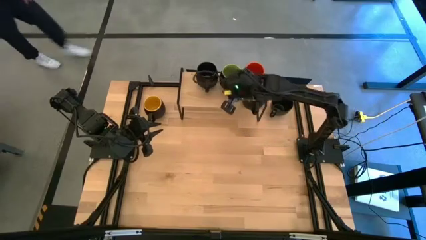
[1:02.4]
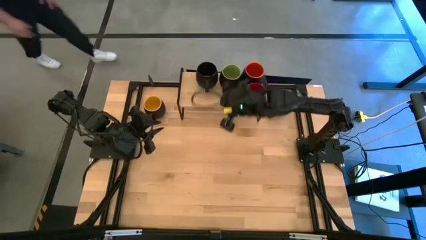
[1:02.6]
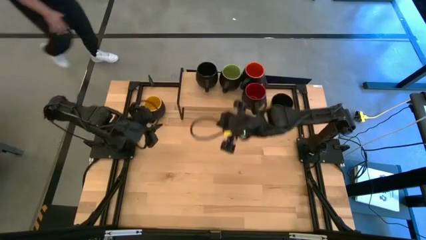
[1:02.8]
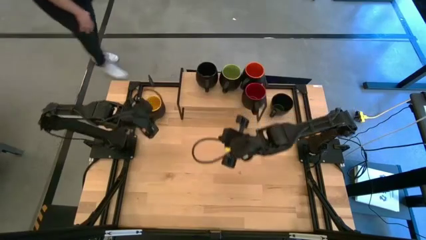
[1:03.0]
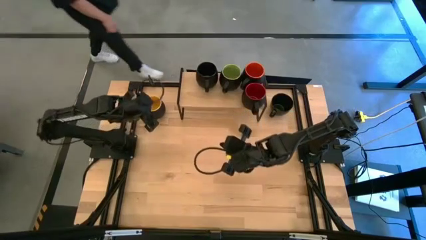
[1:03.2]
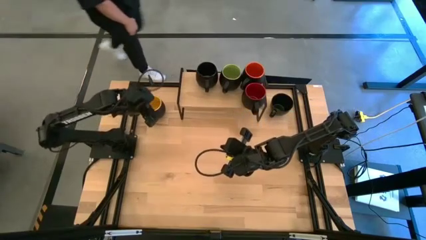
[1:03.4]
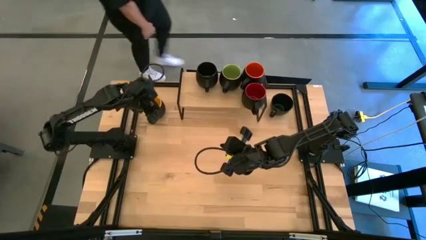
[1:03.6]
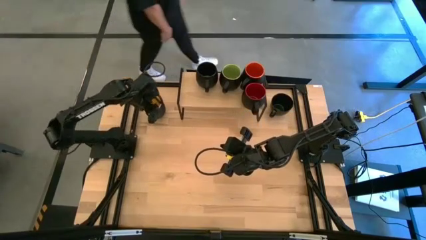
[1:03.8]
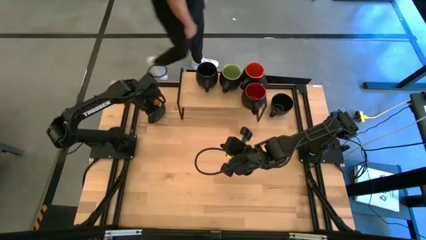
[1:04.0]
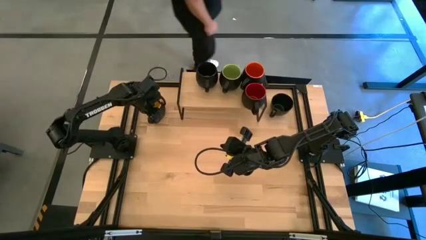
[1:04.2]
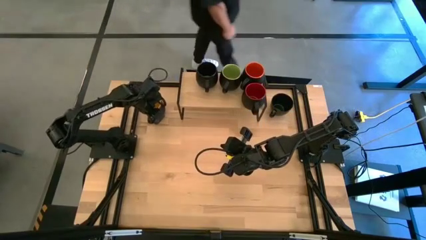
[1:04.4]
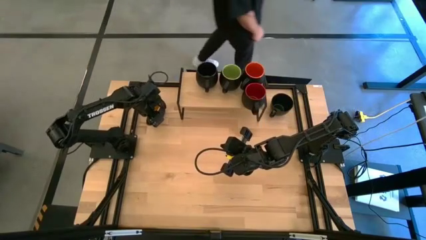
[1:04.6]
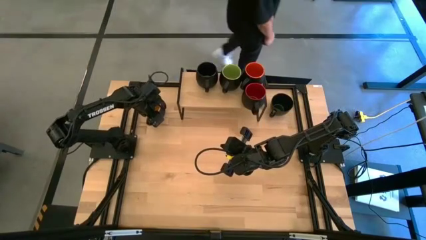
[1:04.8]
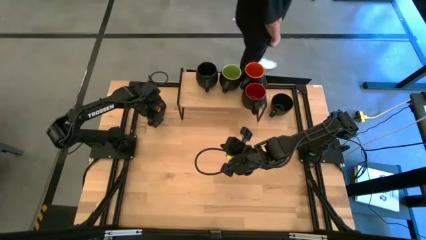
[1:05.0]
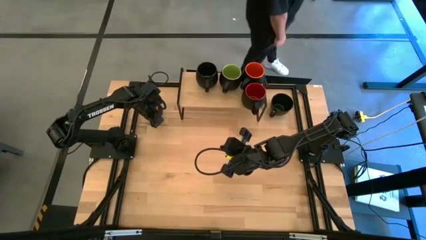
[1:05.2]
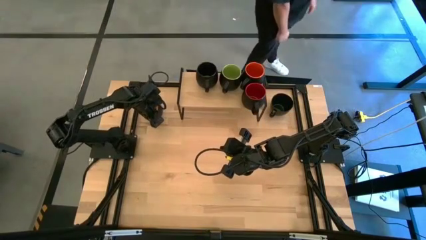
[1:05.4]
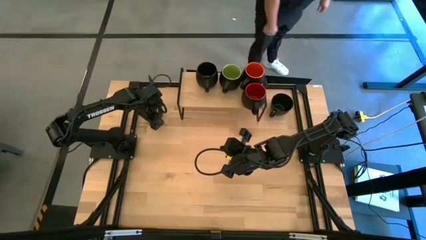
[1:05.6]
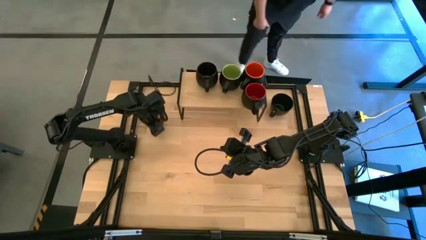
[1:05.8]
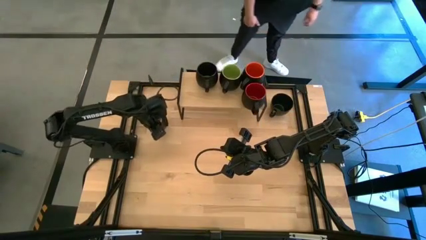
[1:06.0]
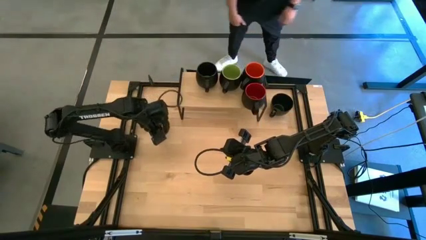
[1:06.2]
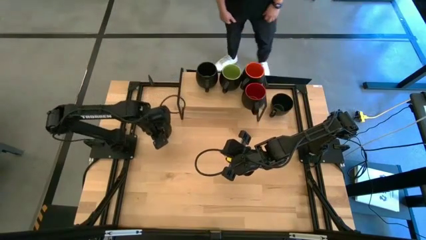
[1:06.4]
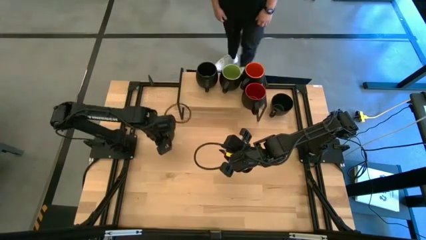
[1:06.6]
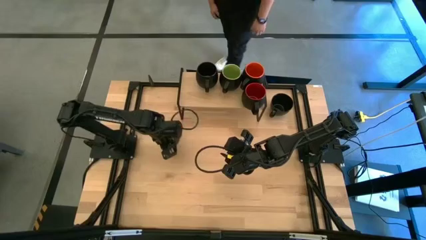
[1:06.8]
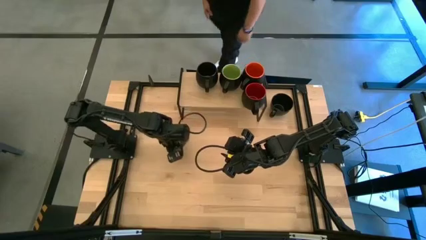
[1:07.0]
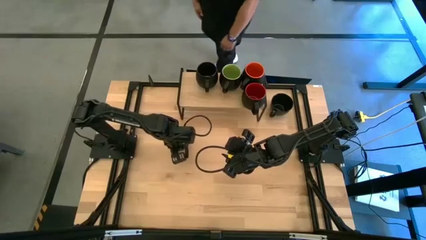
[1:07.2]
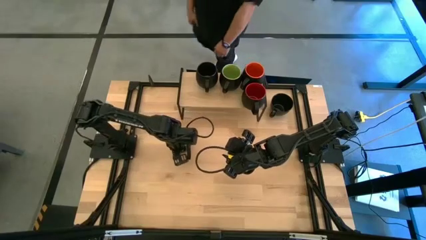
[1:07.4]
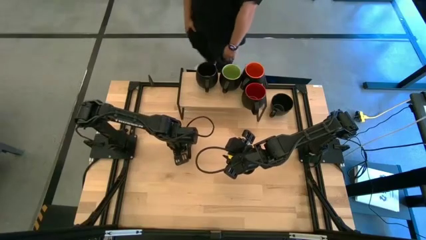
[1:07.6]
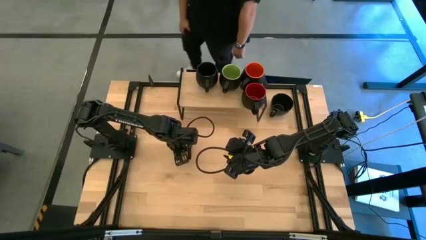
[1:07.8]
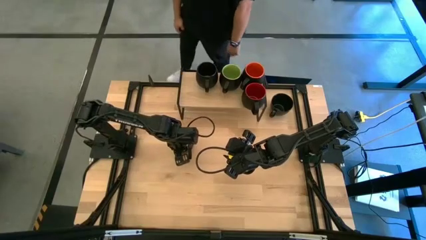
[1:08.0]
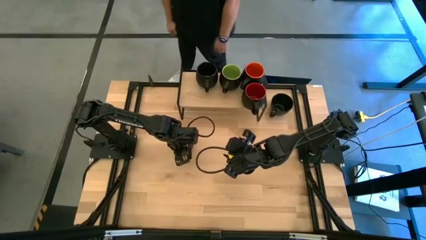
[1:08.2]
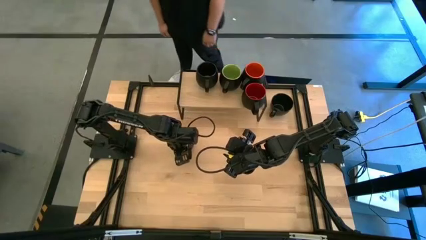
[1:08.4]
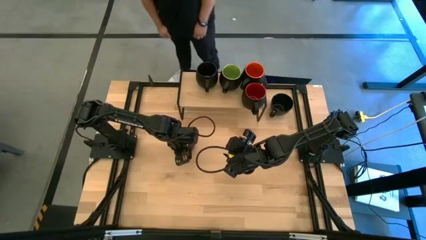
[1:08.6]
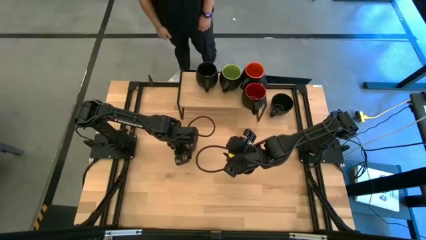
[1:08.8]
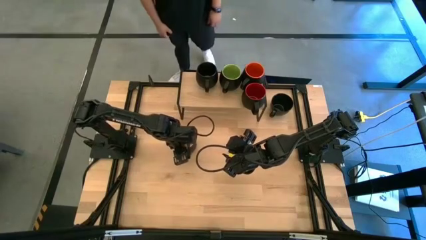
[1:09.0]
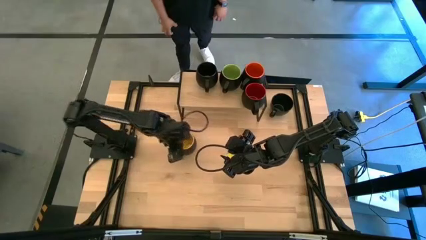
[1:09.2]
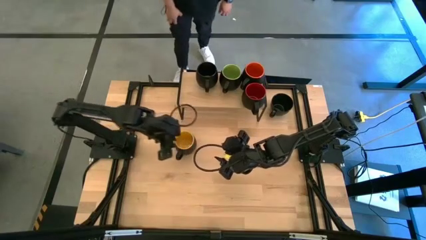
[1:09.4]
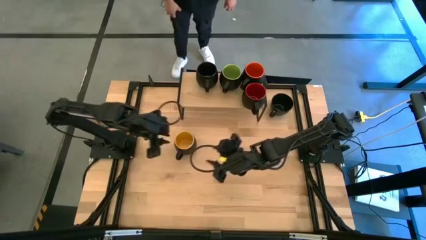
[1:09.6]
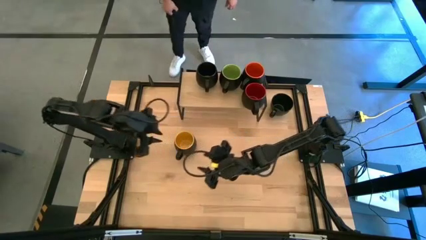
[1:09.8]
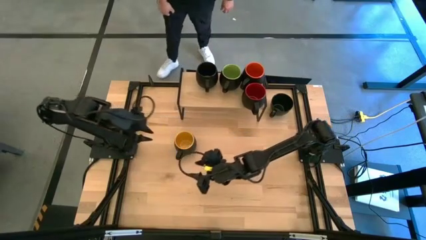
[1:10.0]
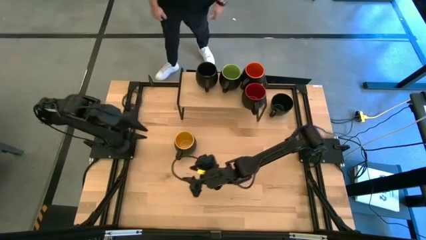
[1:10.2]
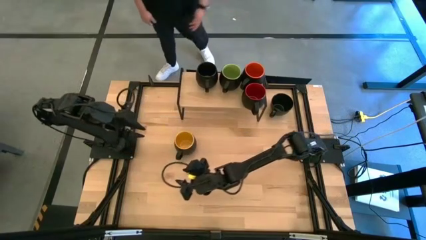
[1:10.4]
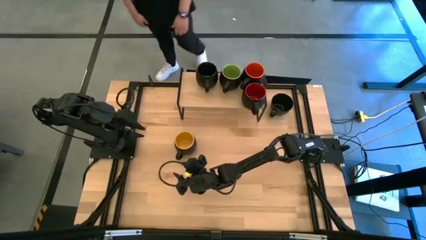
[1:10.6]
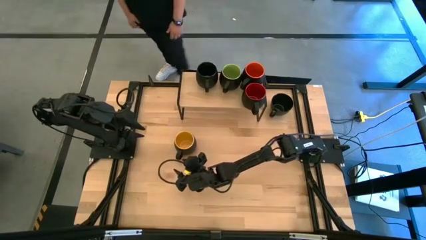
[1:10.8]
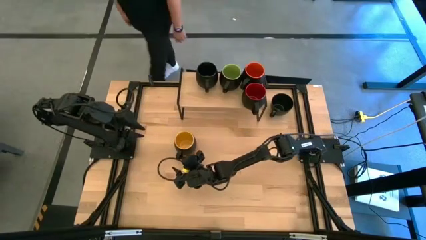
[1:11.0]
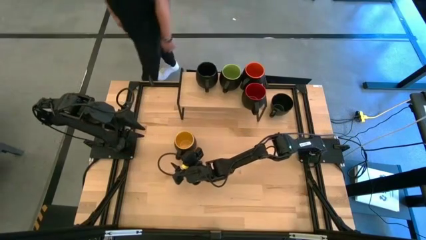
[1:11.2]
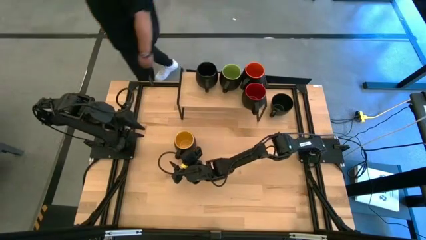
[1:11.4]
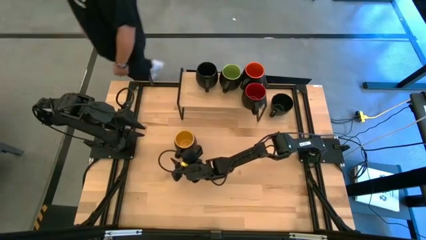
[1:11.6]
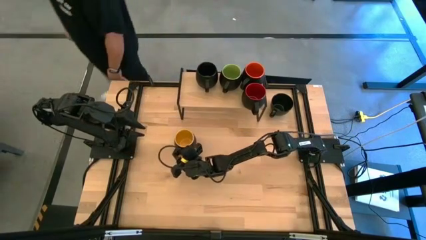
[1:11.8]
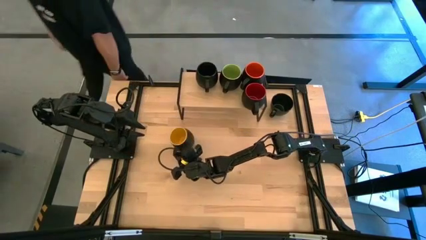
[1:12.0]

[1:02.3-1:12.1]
Task: Place coffee mugs
Put the yellow mug on the shelf

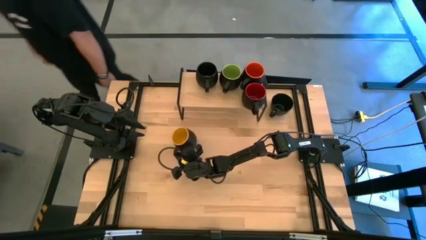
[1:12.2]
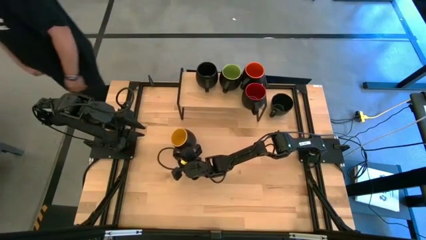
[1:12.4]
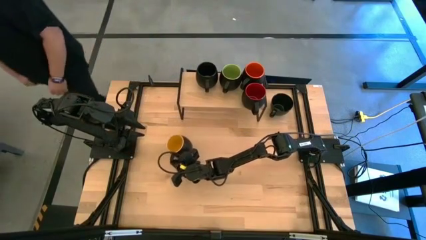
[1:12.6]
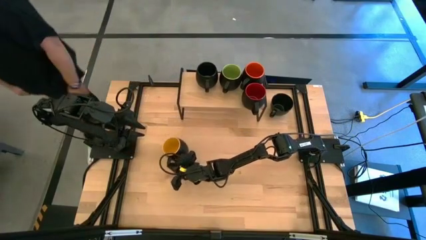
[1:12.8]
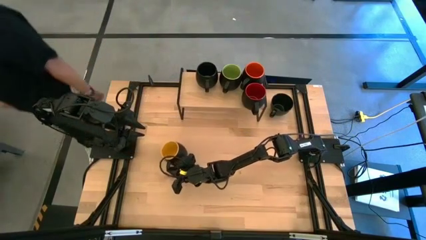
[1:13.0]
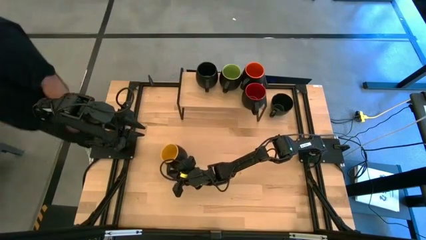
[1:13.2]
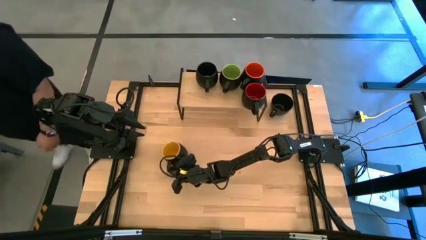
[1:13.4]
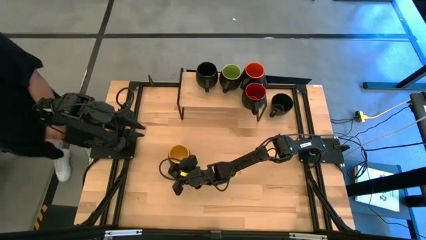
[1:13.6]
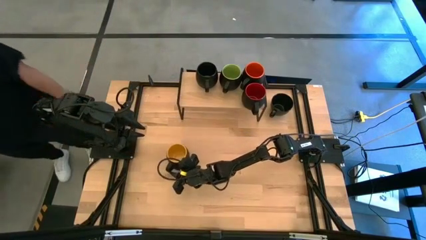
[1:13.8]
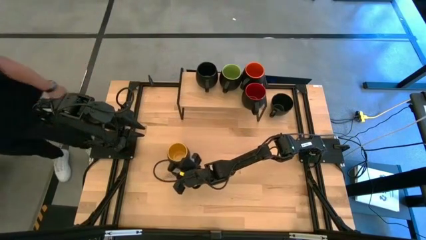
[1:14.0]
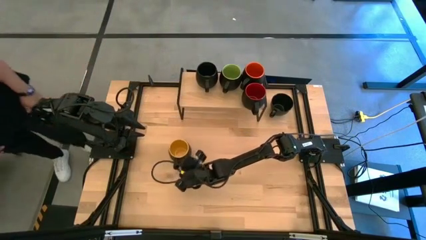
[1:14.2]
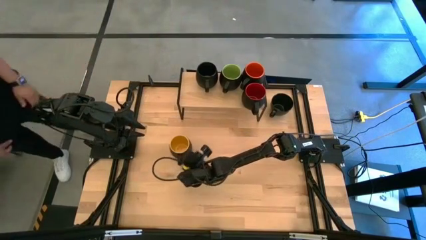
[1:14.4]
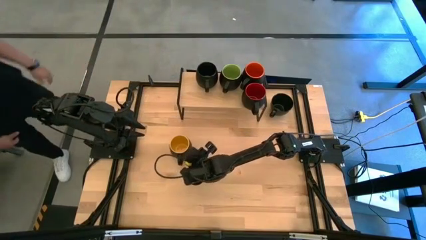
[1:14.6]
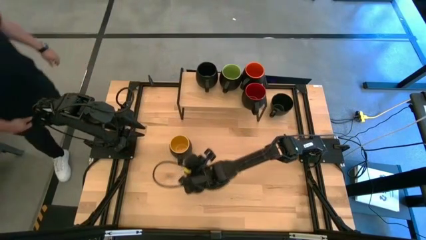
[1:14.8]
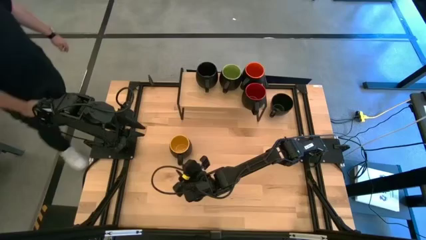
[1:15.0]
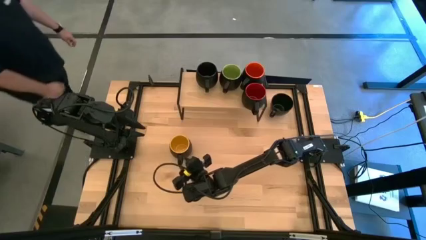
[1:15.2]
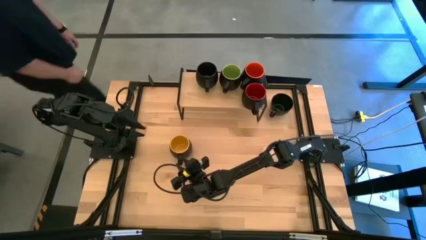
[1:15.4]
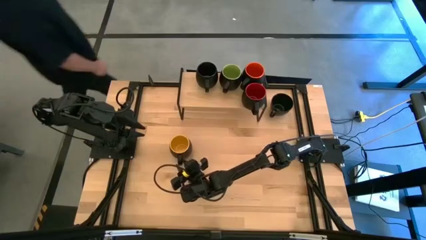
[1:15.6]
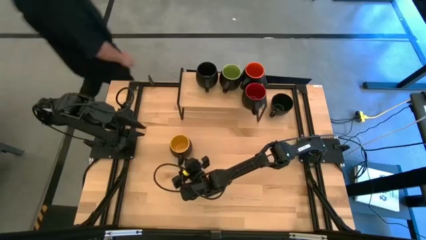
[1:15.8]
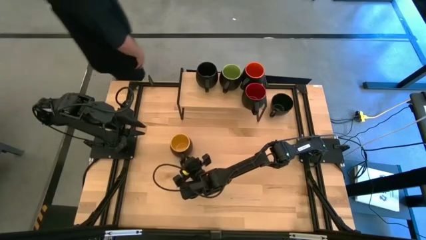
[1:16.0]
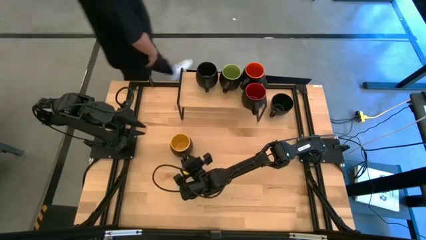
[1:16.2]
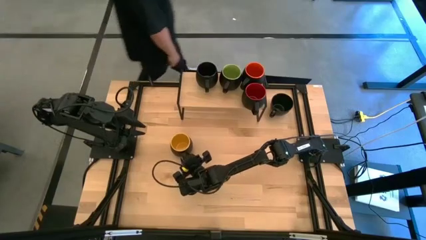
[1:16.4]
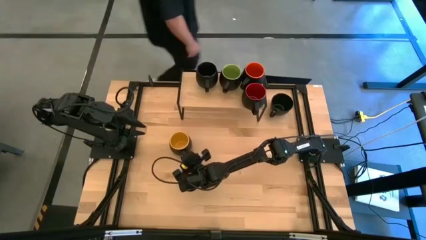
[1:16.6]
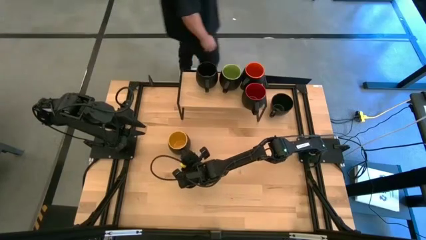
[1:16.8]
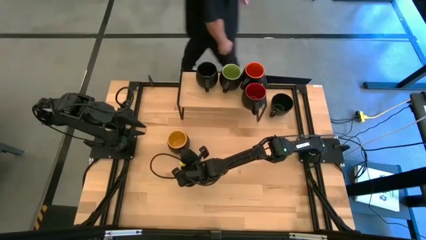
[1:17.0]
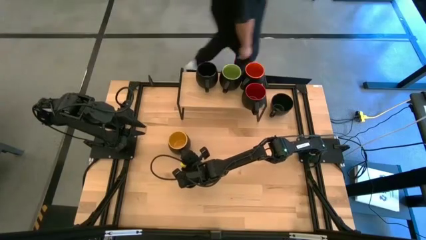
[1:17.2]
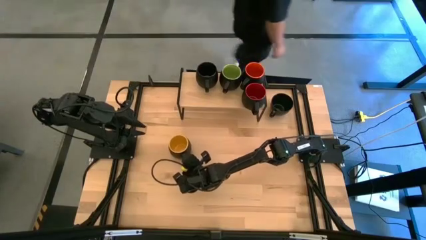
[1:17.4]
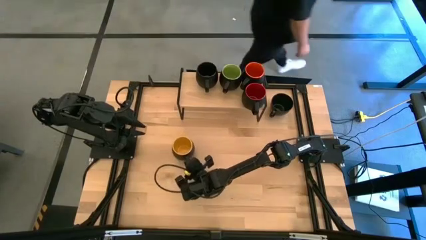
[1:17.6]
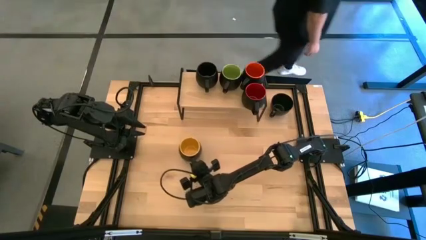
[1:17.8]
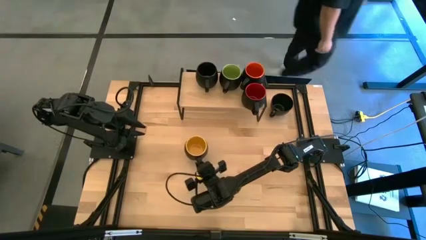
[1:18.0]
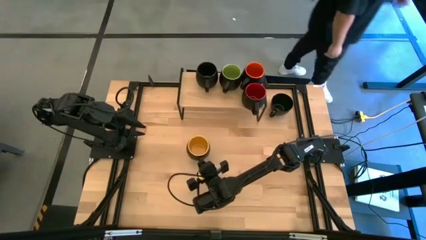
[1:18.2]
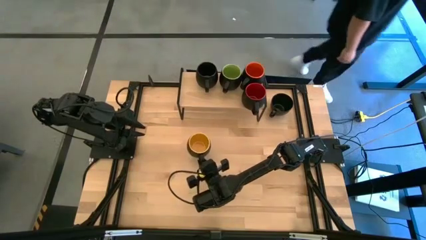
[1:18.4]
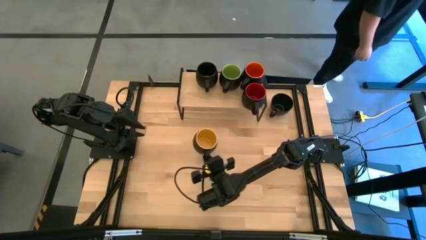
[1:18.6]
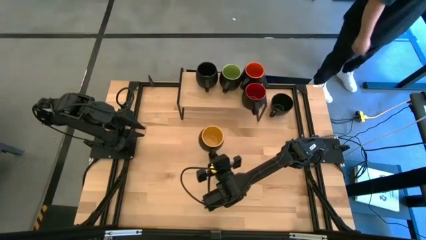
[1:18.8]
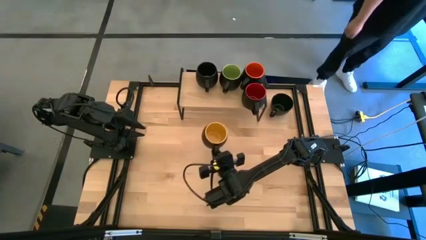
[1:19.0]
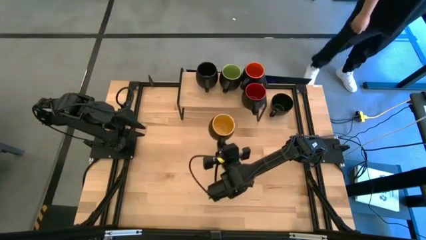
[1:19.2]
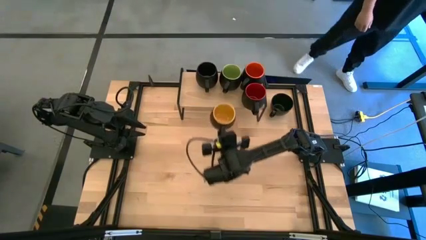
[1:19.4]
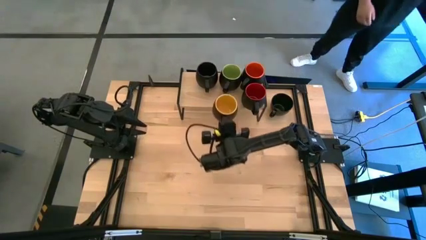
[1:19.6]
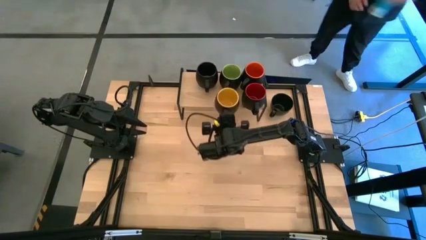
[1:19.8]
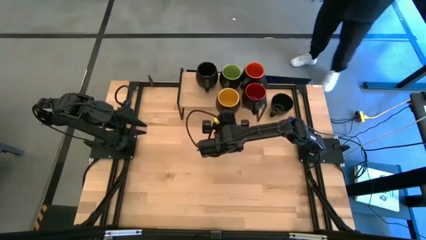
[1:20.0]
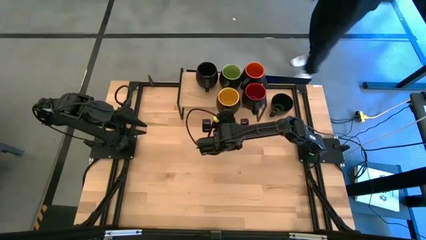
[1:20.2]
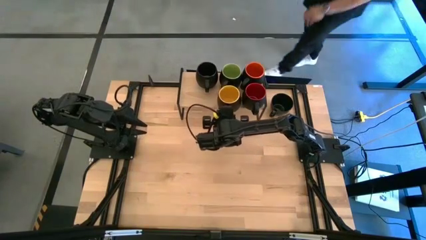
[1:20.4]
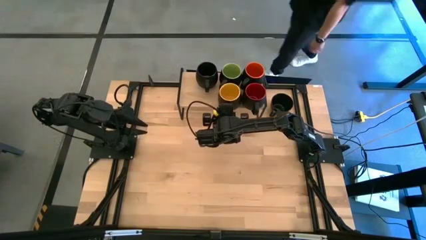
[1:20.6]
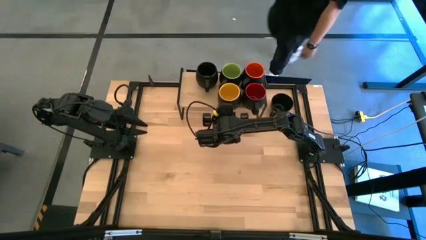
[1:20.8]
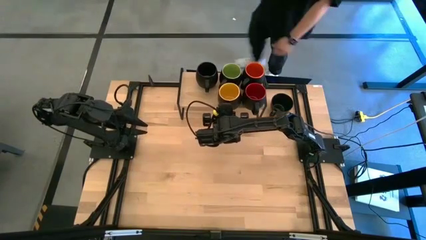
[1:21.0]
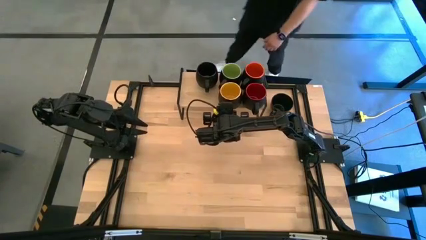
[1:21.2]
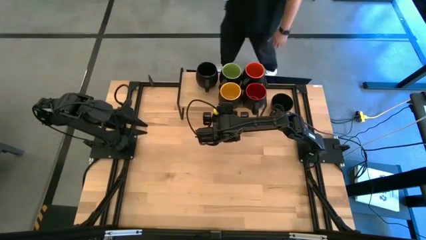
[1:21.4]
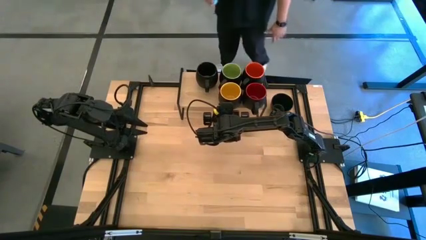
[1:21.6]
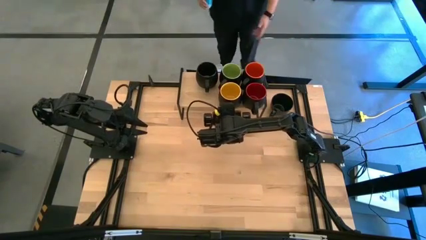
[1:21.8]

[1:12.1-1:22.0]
Put the yellow mug on the shelf
